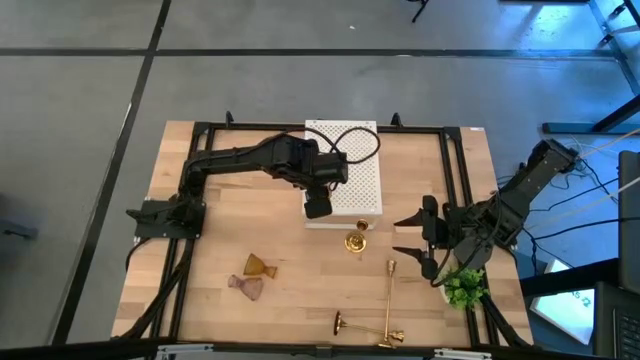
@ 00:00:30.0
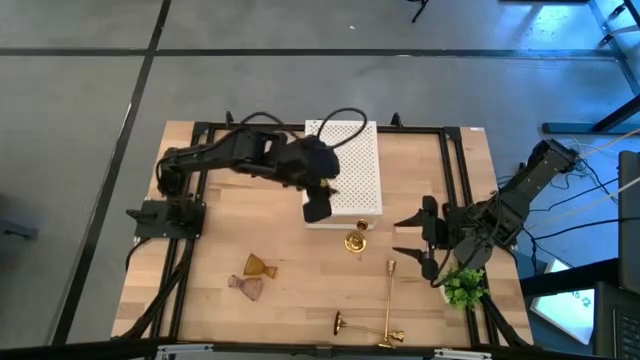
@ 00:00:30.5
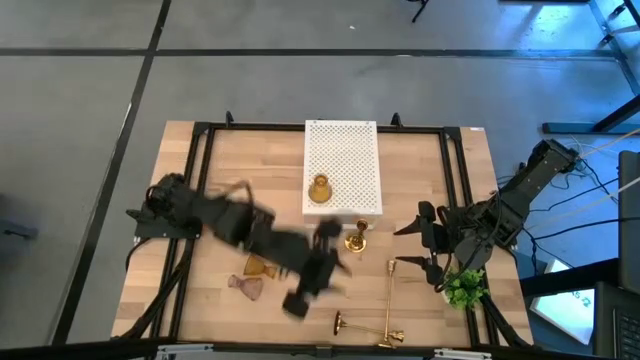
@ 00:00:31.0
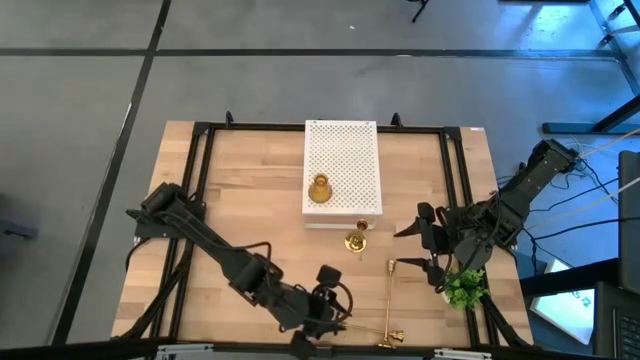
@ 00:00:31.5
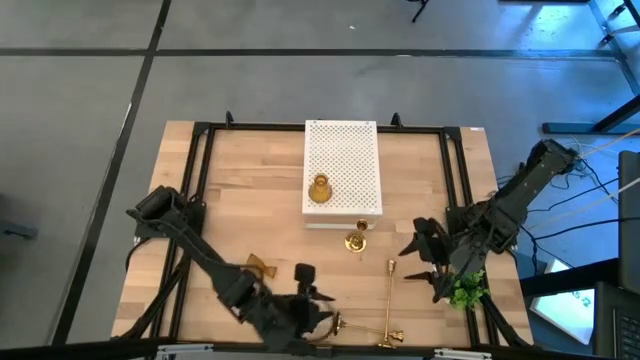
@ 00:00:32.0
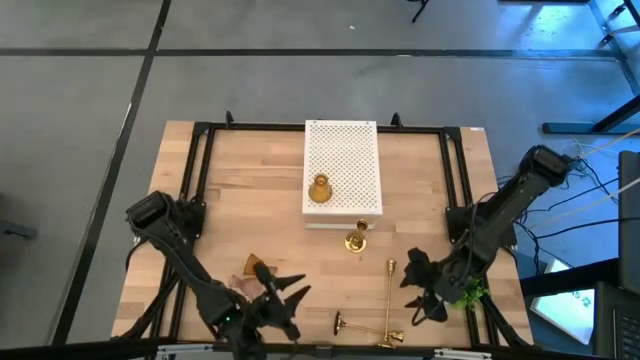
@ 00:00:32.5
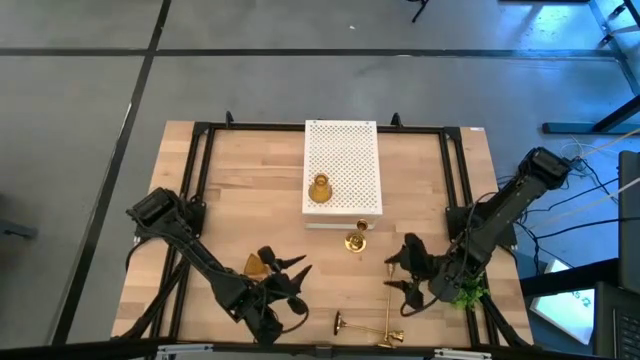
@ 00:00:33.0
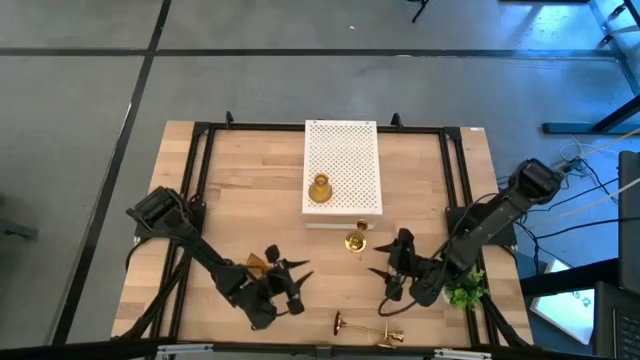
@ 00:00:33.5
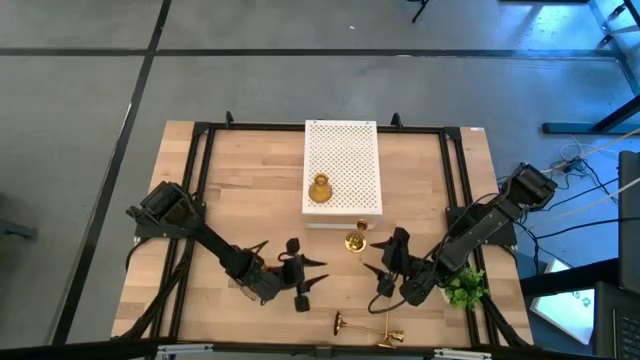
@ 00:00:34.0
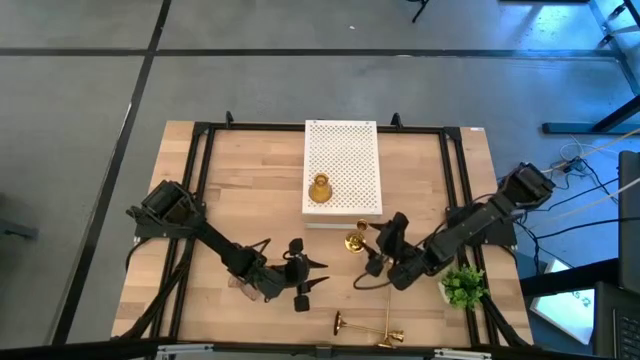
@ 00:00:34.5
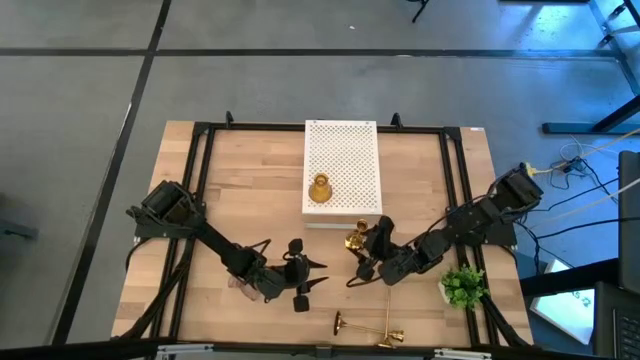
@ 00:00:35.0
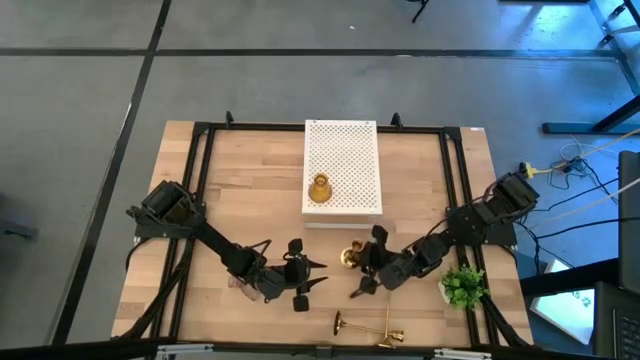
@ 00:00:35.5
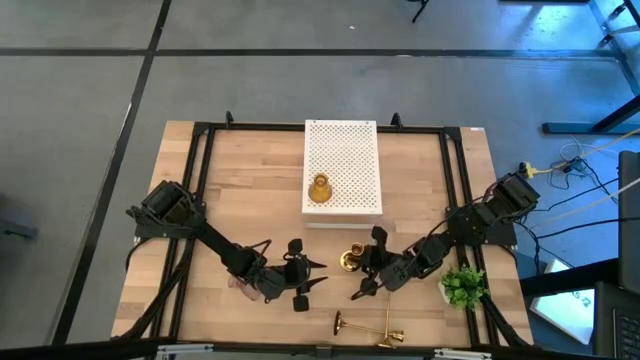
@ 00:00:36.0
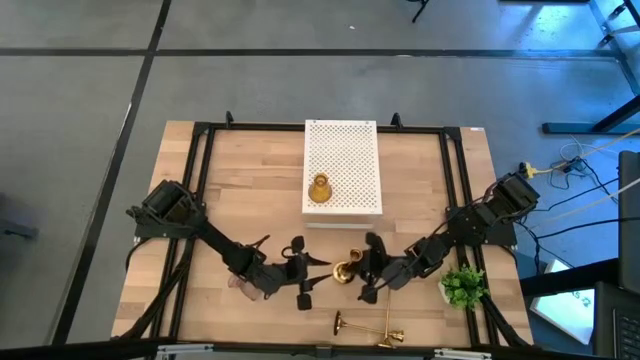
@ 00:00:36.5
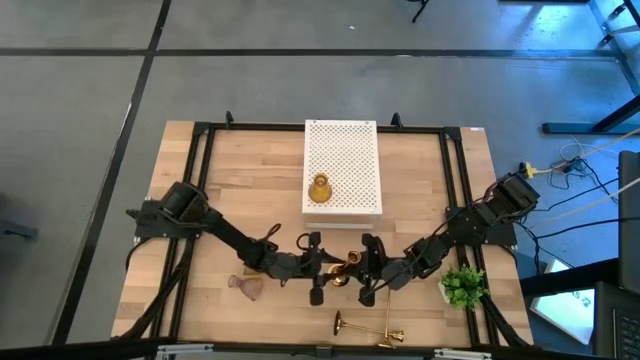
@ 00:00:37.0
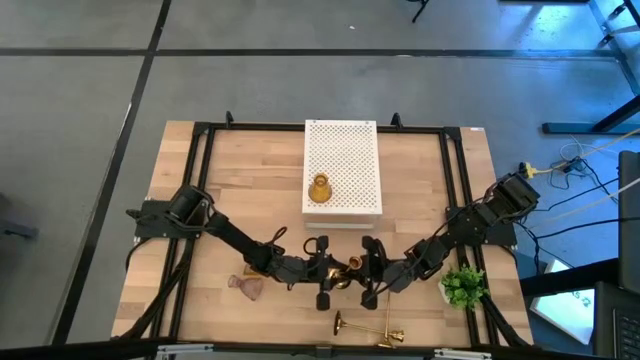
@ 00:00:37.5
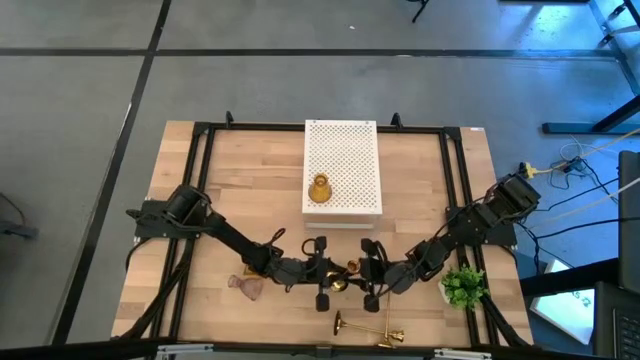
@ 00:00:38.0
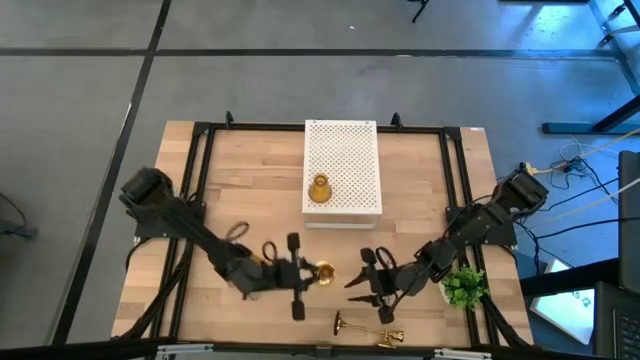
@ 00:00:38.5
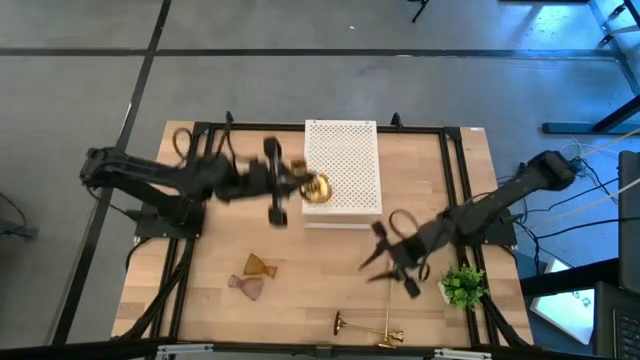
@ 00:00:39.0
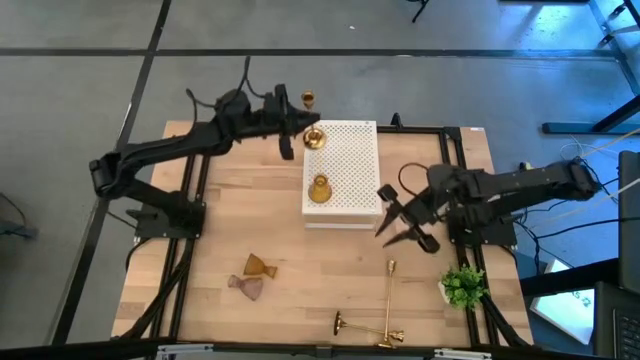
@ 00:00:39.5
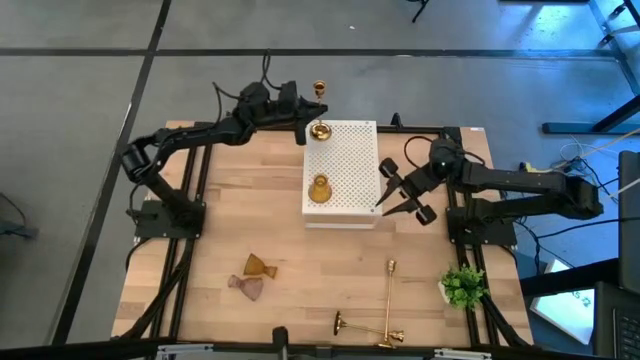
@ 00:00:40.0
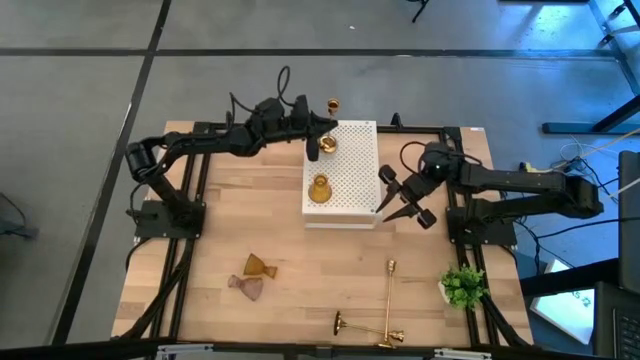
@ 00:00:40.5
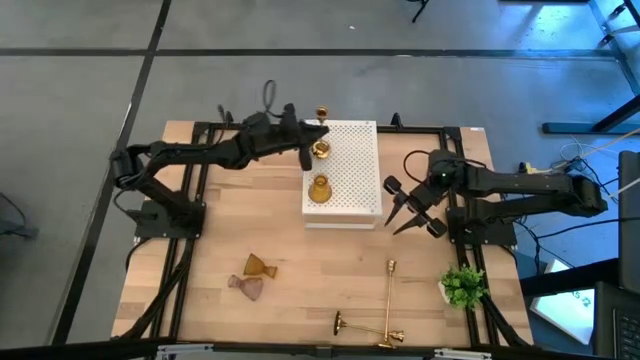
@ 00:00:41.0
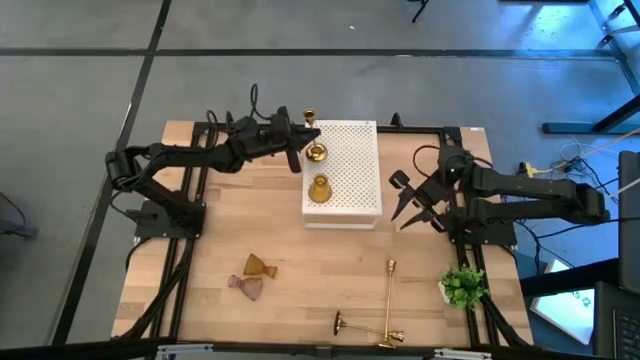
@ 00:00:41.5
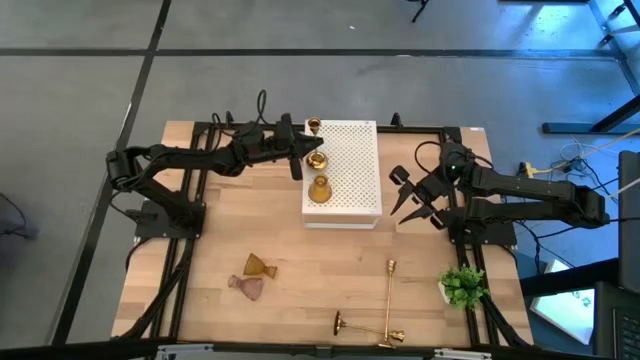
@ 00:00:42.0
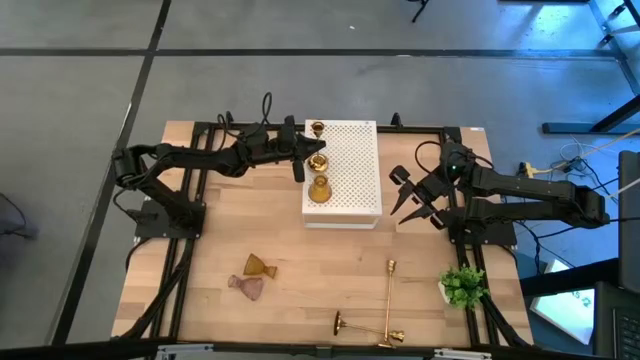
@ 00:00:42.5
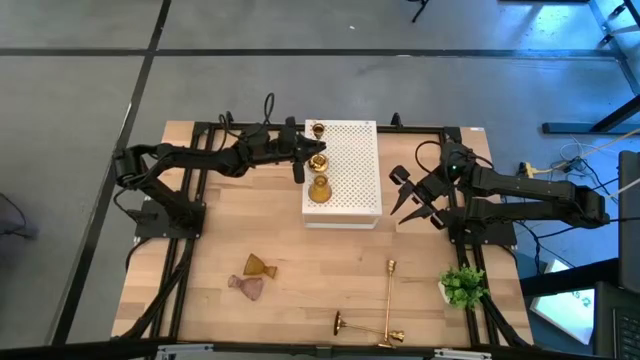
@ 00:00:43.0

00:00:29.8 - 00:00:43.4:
Task: Pick & Place candle stick holders
Put the top gold candle holder on the shelf

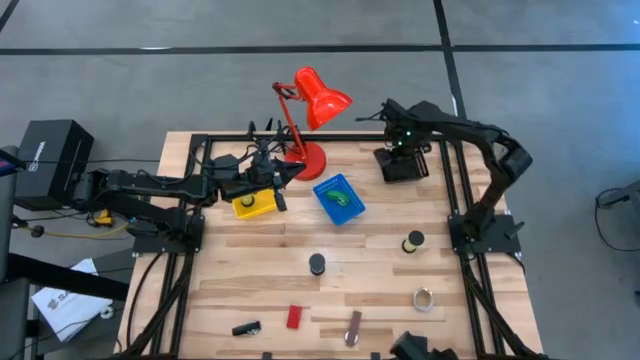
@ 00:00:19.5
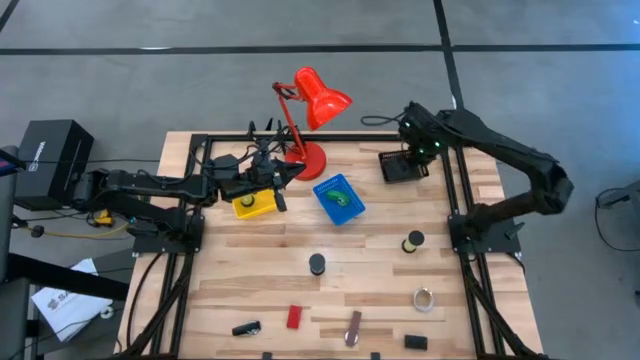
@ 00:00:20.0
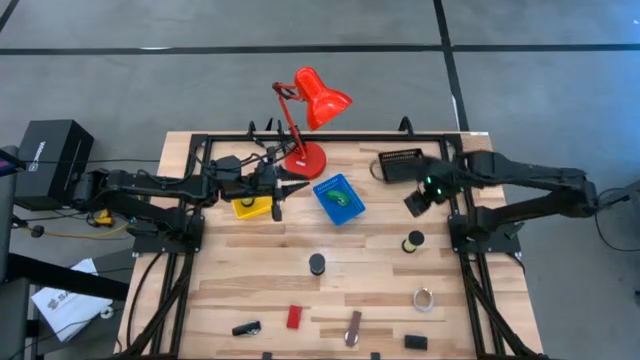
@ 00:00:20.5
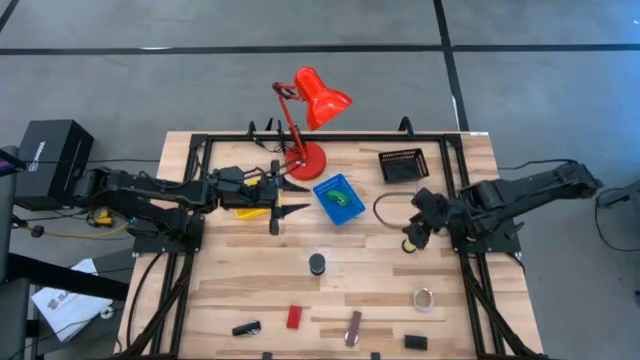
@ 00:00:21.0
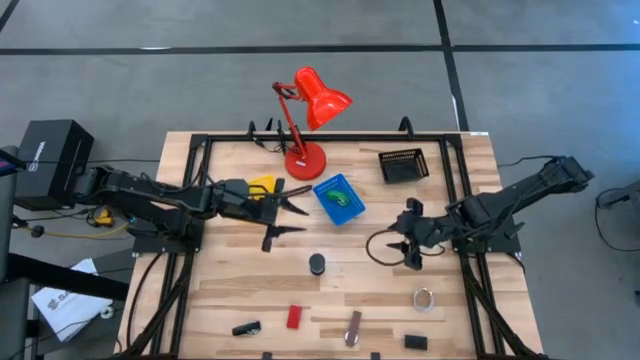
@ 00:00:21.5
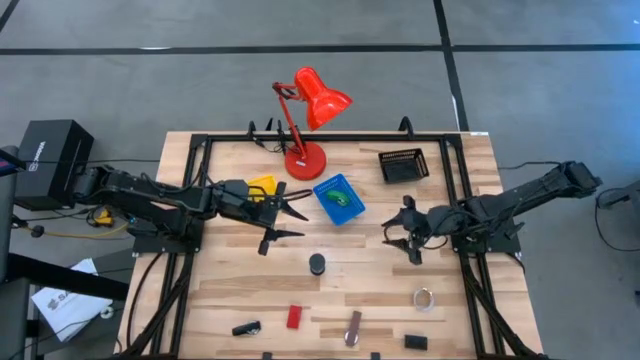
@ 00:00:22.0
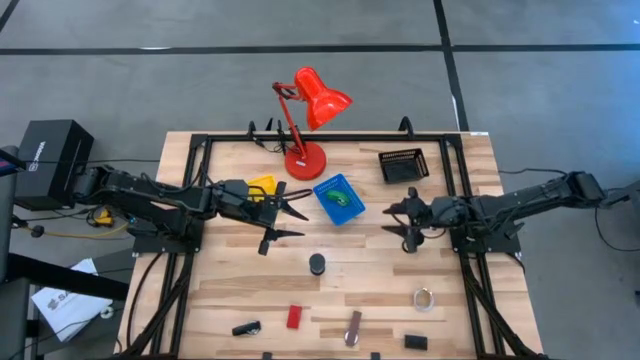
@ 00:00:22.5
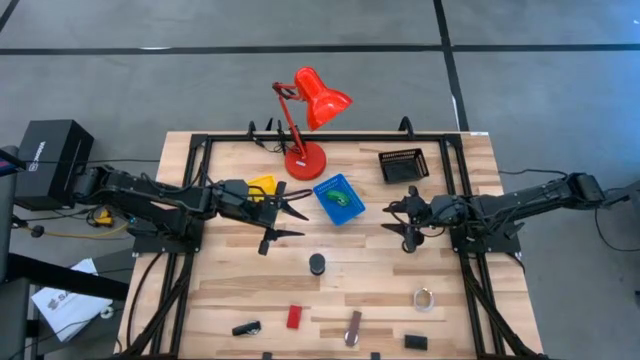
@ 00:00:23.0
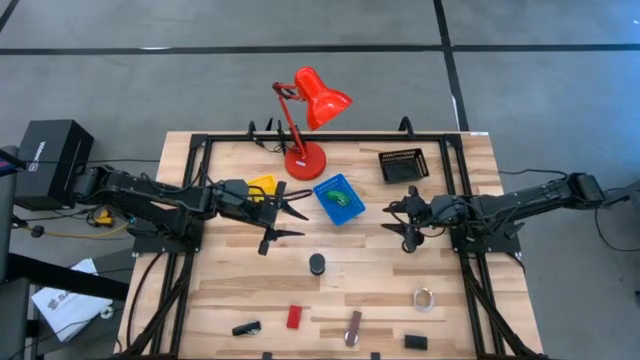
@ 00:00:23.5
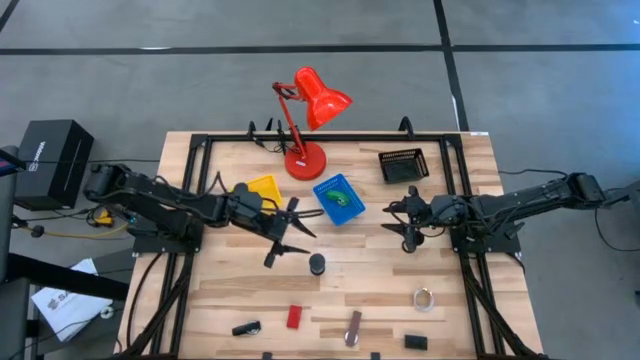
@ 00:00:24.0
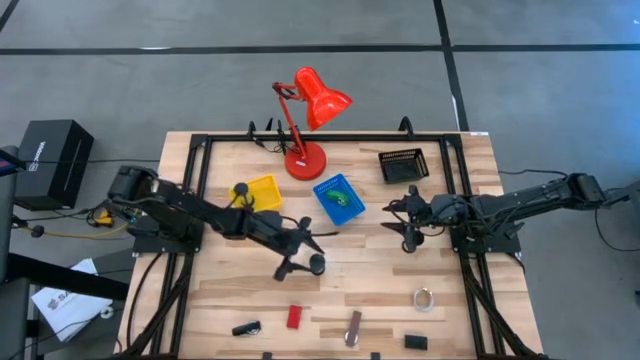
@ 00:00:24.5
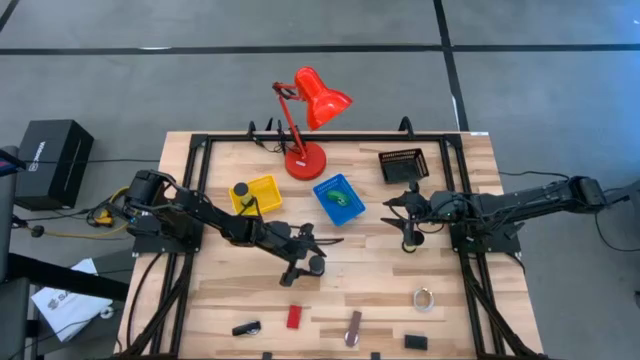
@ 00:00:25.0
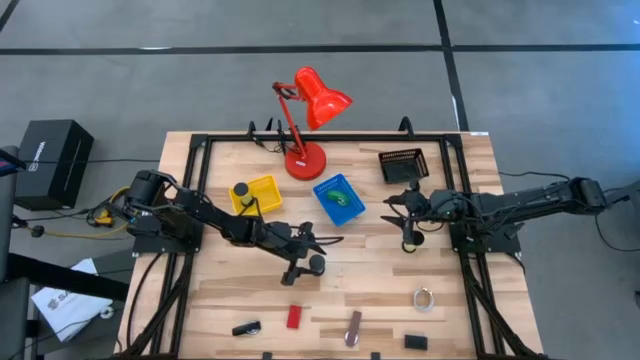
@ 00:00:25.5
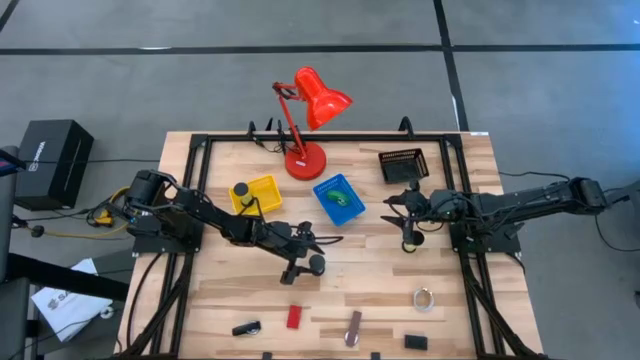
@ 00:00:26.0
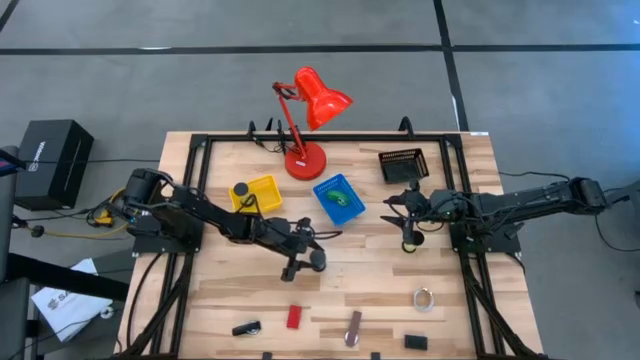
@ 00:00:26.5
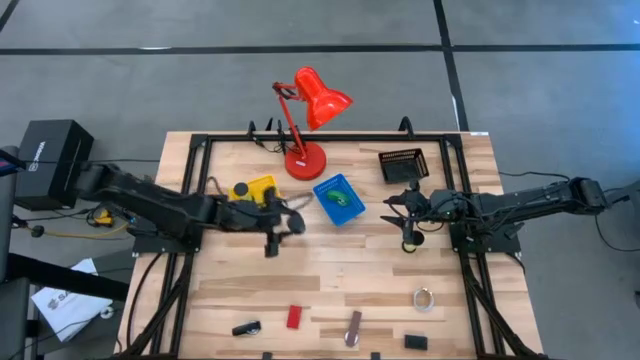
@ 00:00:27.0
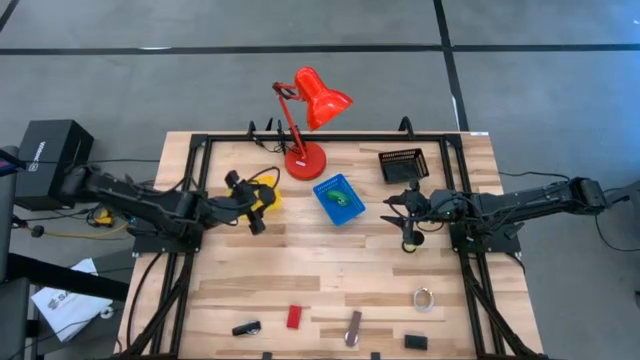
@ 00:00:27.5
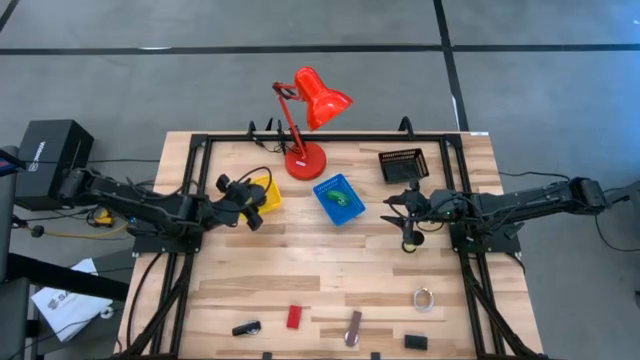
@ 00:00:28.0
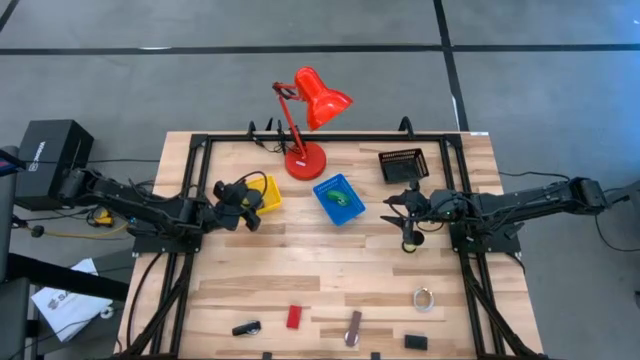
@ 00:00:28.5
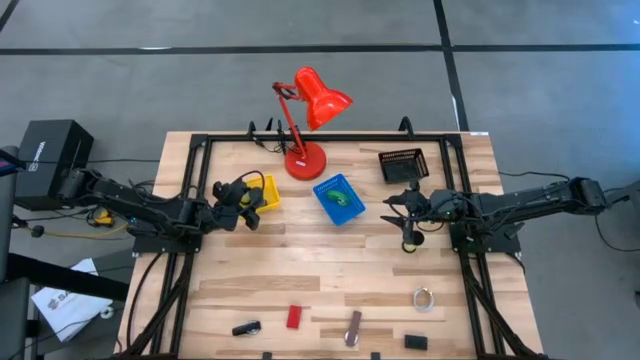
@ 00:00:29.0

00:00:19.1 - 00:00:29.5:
Task: Pick & Place Office items
Put the blue hourglass into the yellow bin
